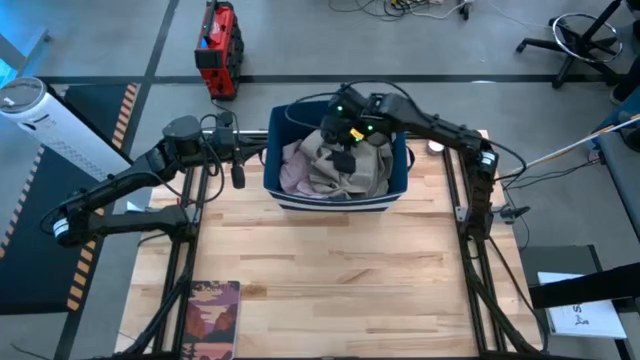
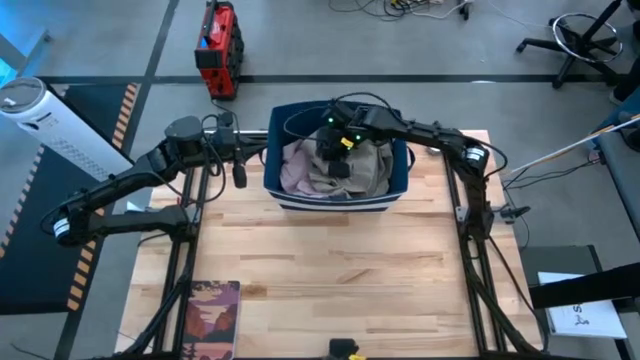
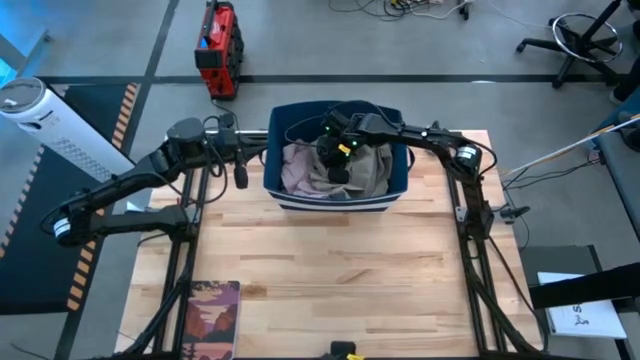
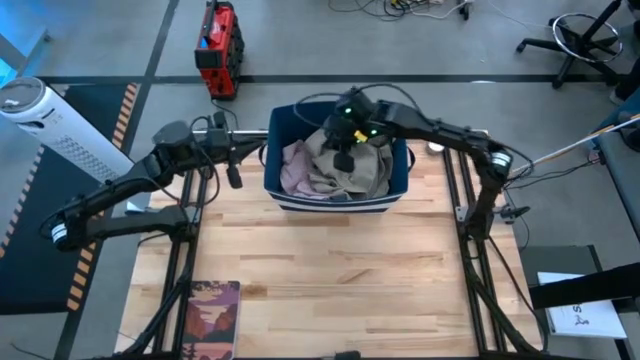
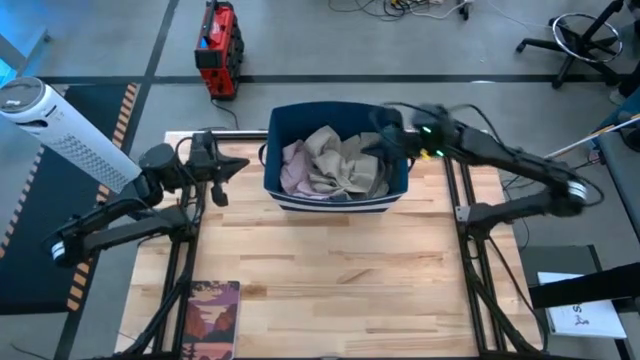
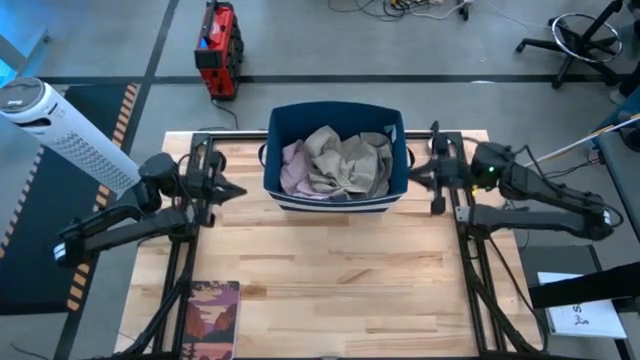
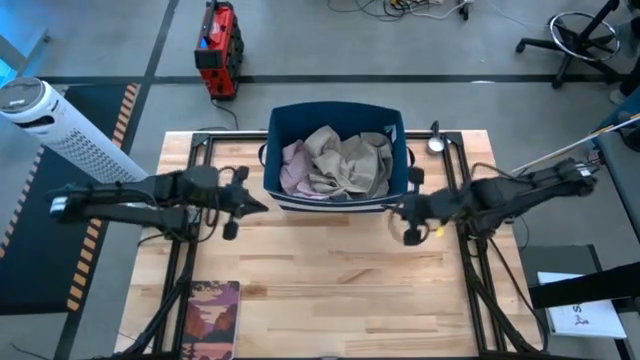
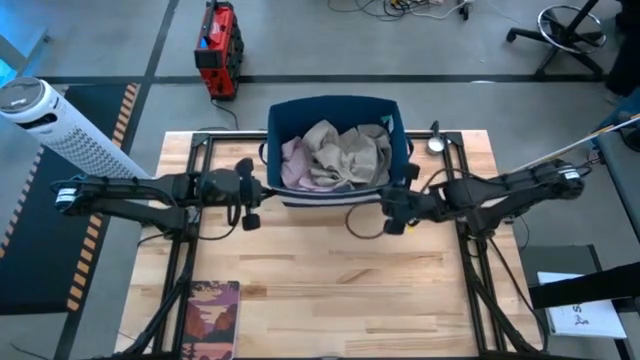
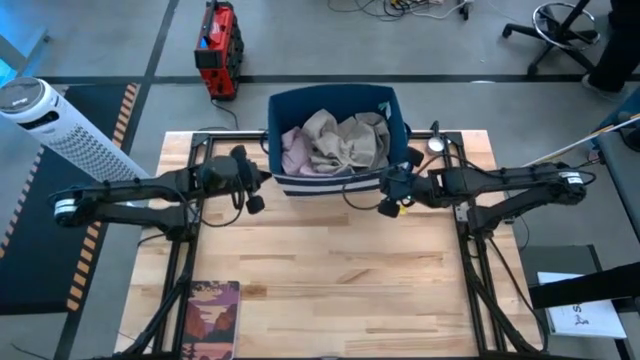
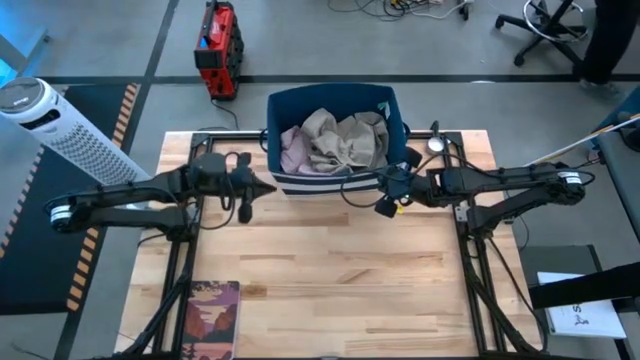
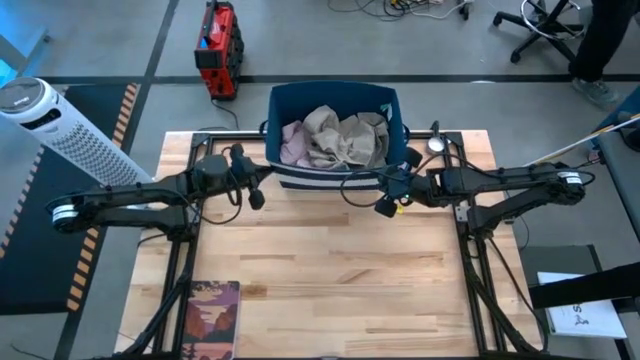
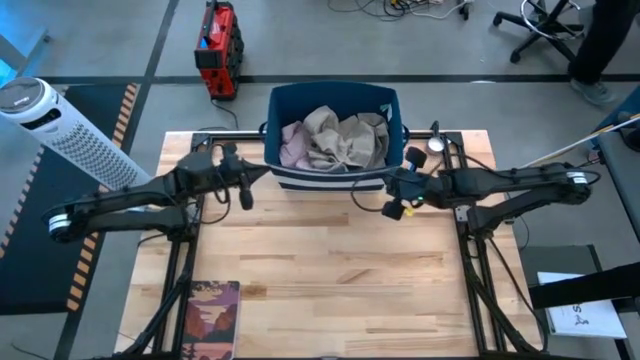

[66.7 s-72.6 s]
Task: Sort clothes
Move the blue laundry organizer to the top center of the table

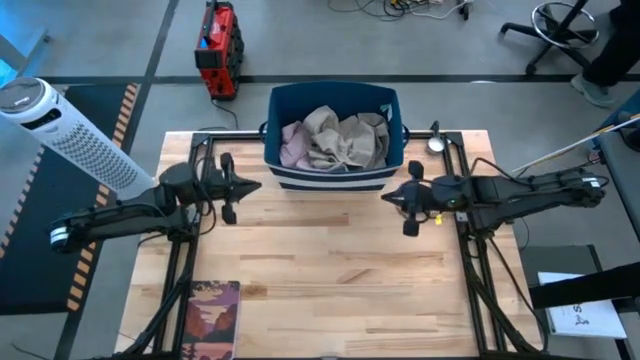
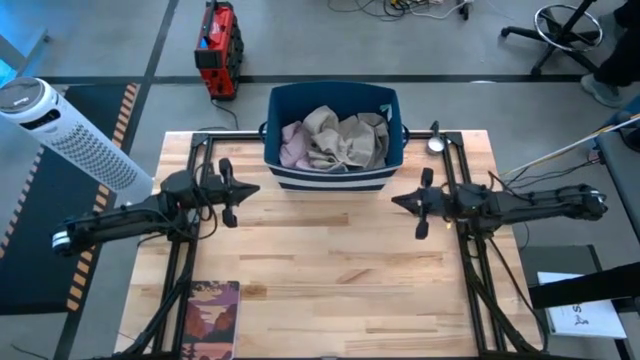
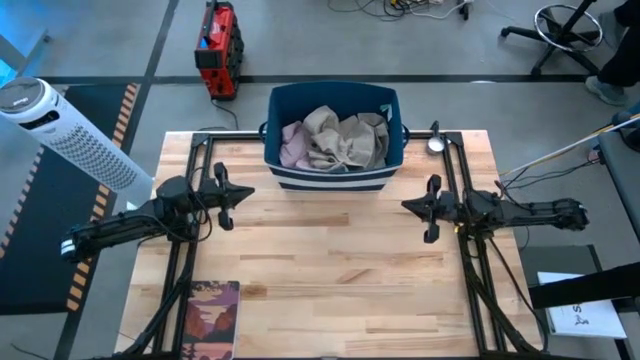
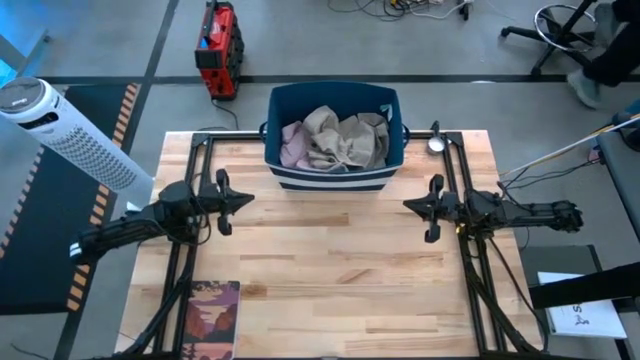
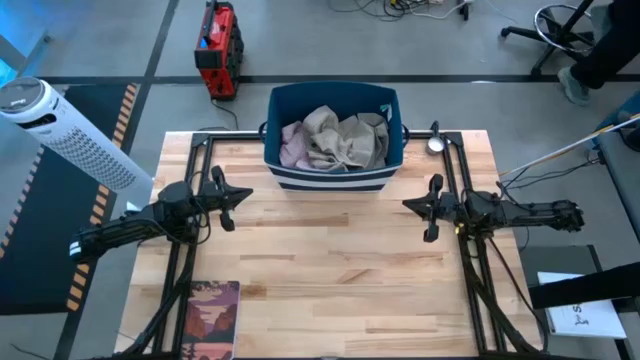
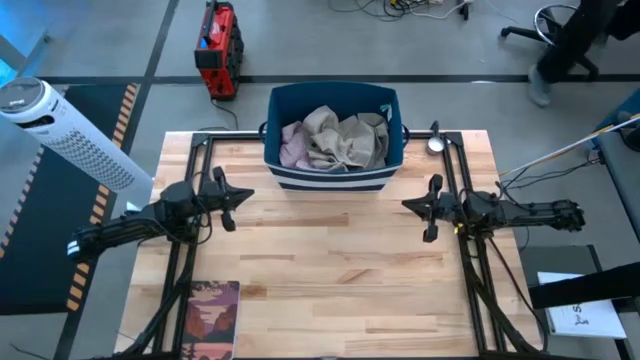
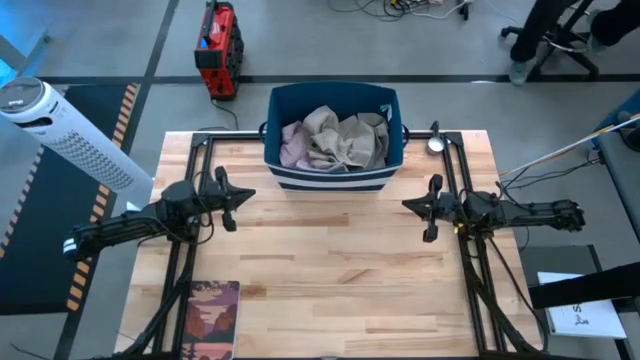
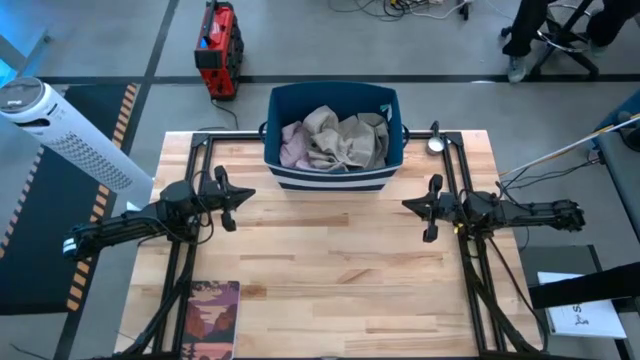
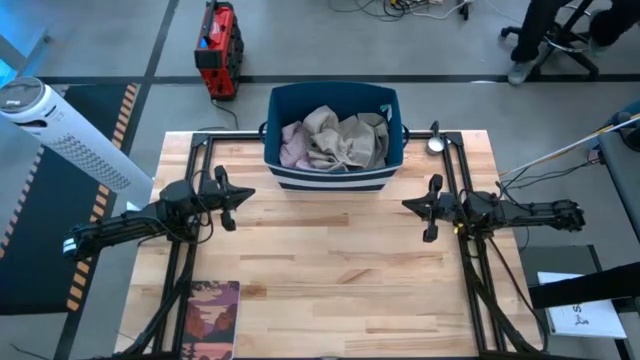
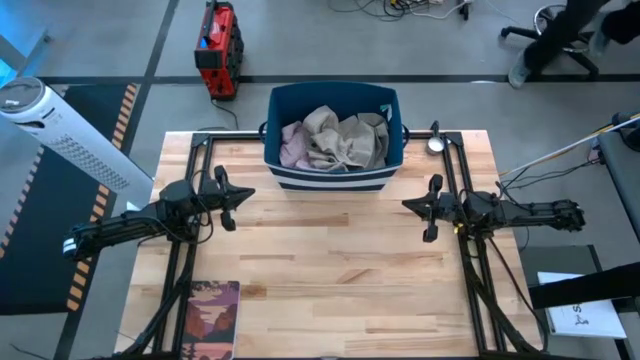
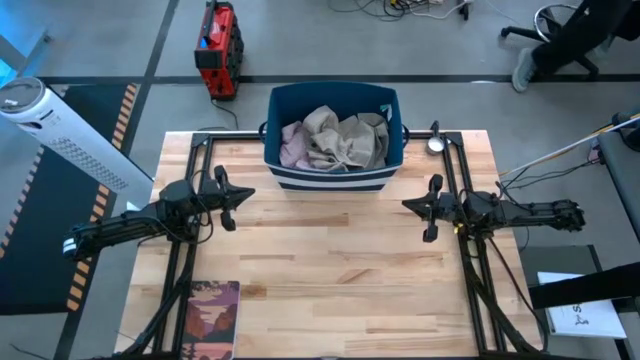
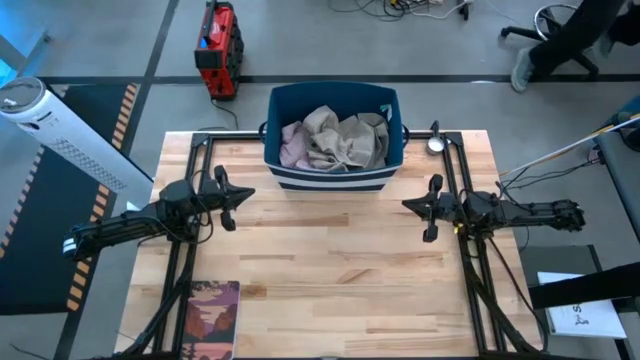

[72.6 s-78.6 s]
Return to Home Position

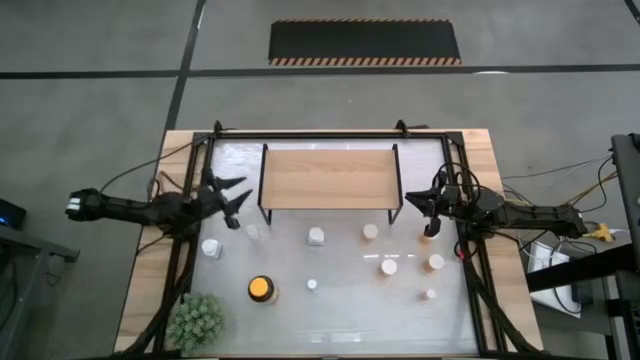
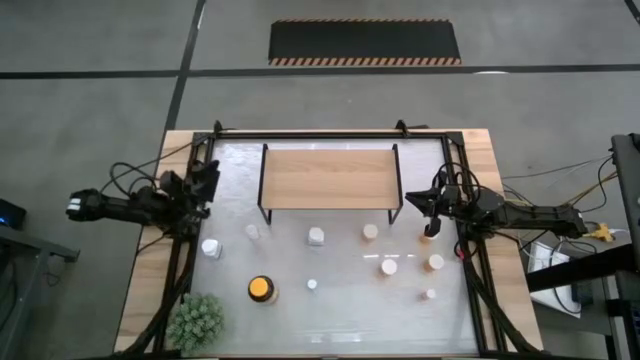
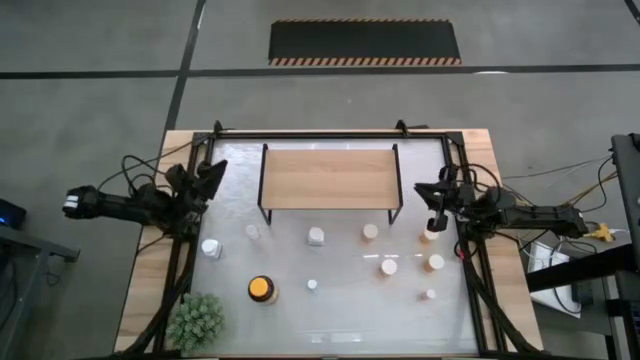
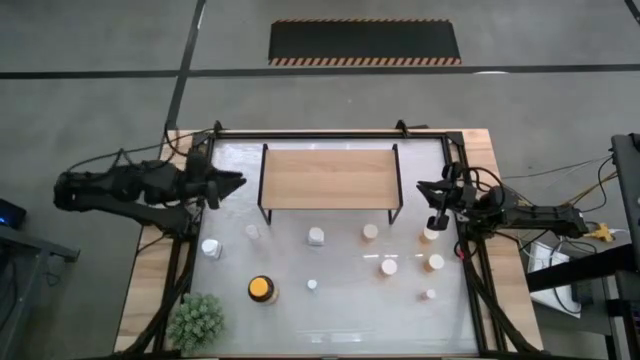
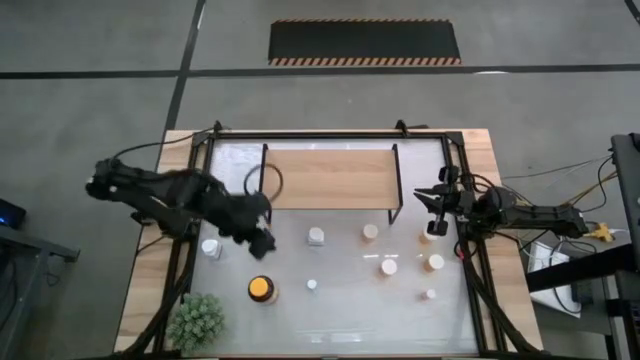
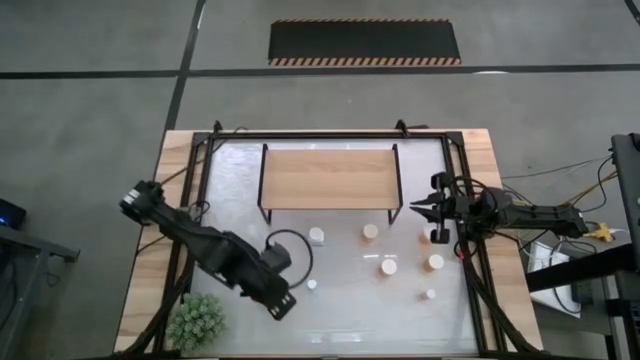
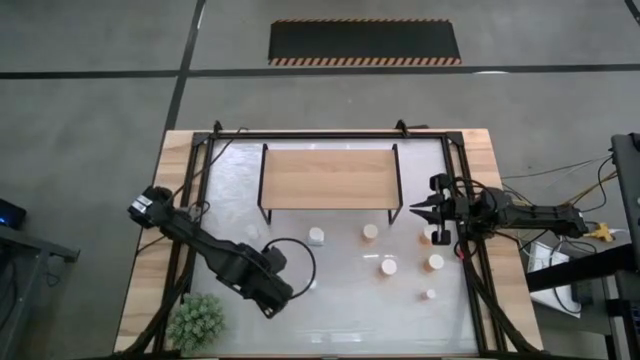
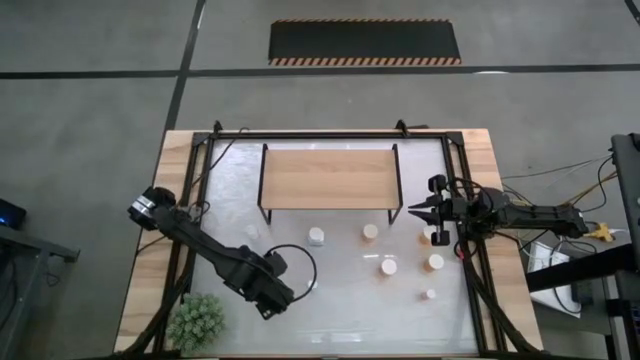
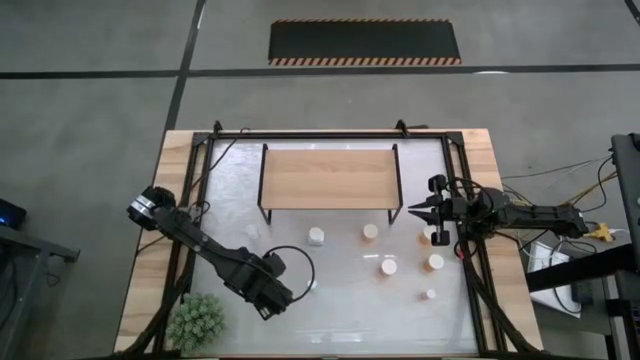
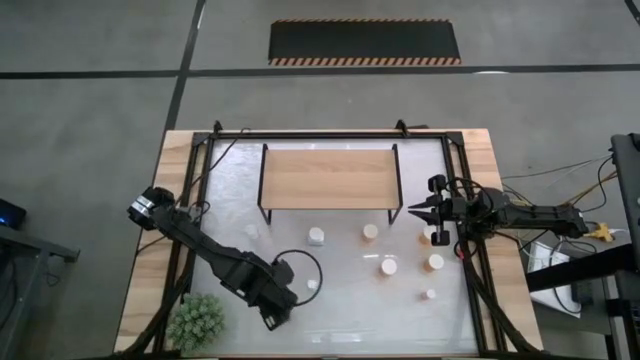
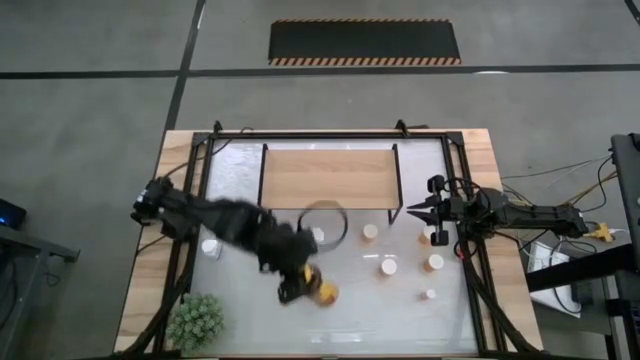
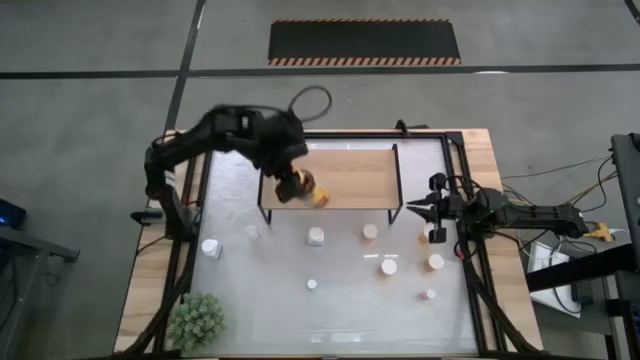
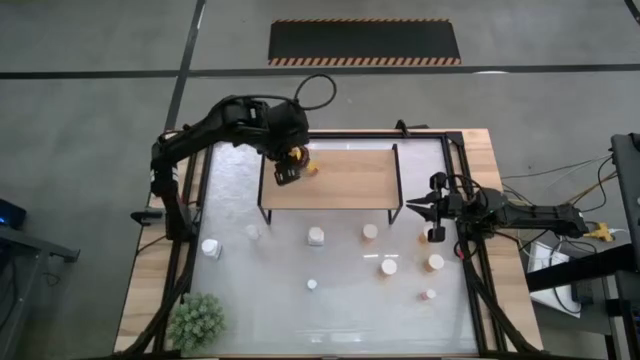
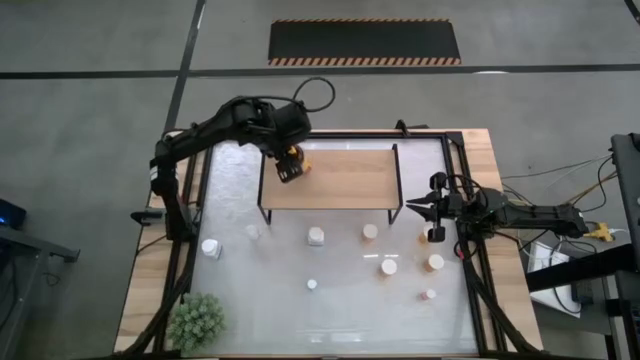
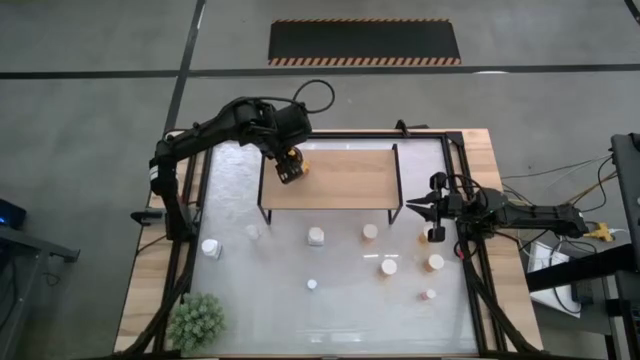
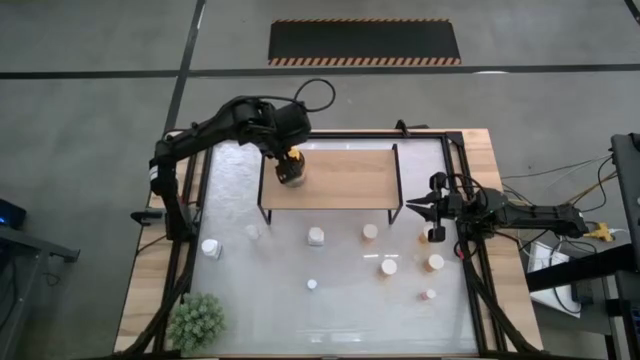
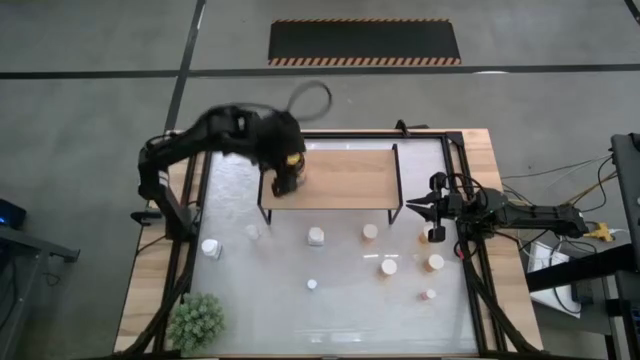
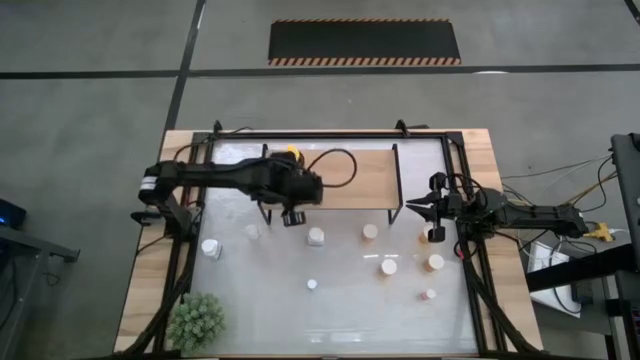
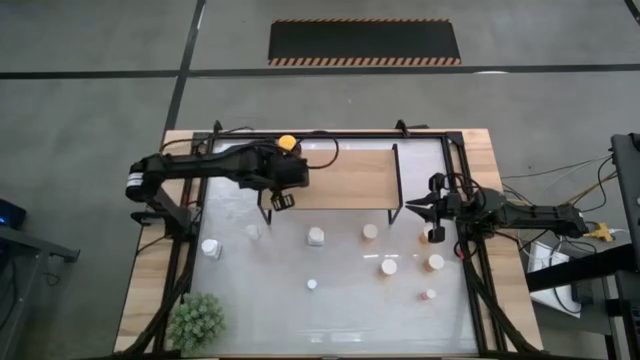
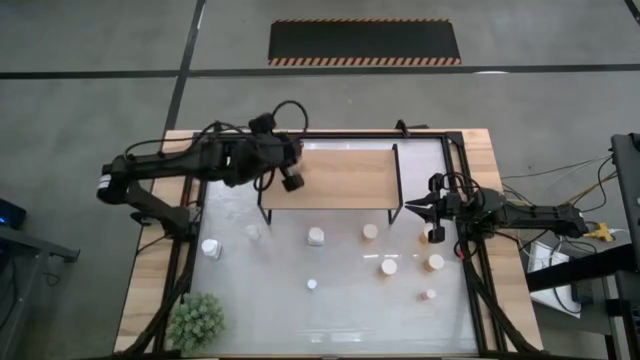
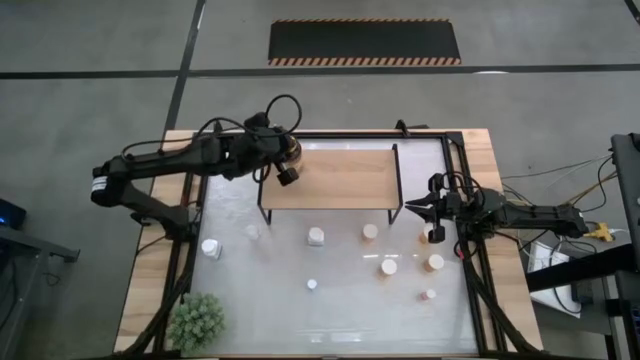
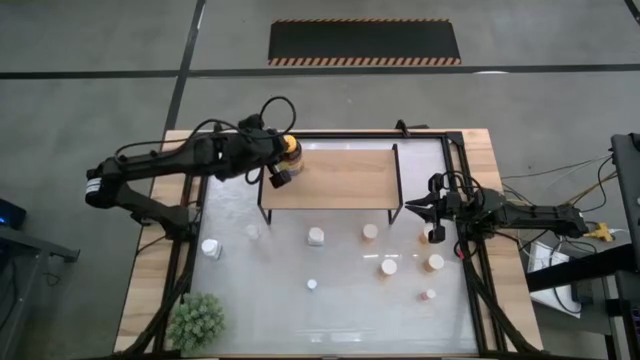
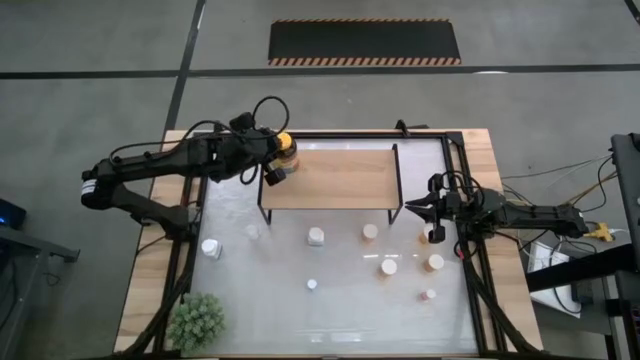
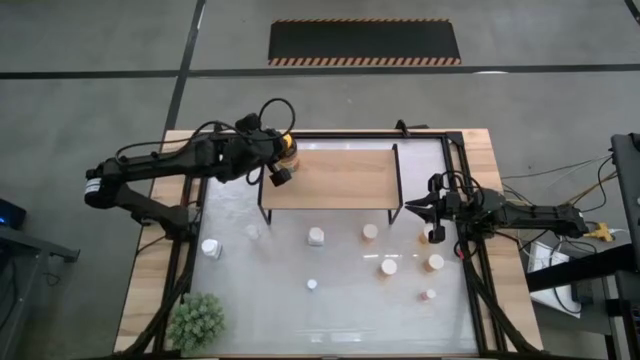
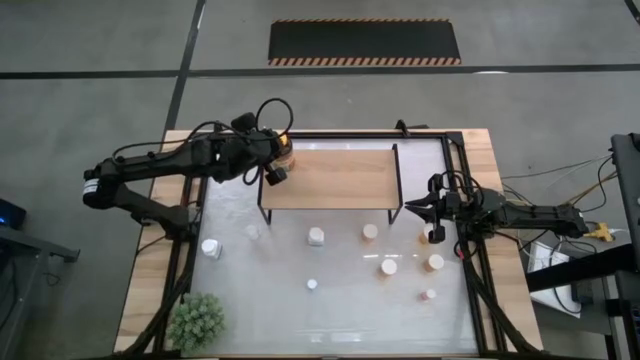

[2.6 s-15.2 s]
Task: Pick and place medicine bottles onto shelf by color
Put the yellow pill bottle on the shelf
